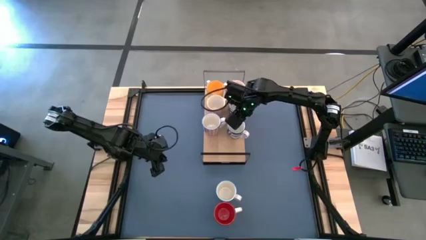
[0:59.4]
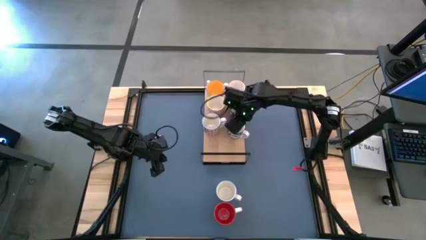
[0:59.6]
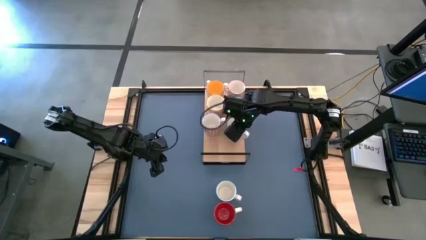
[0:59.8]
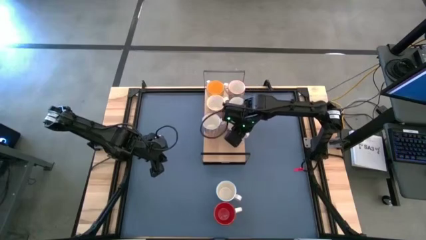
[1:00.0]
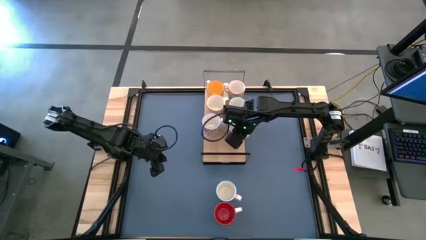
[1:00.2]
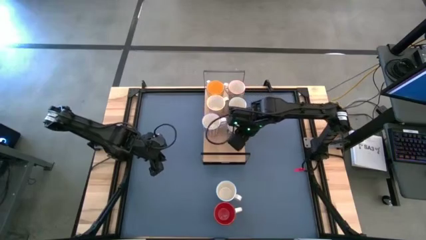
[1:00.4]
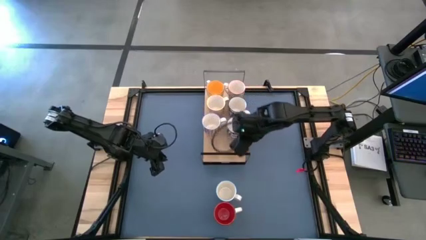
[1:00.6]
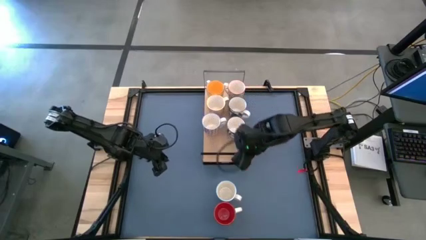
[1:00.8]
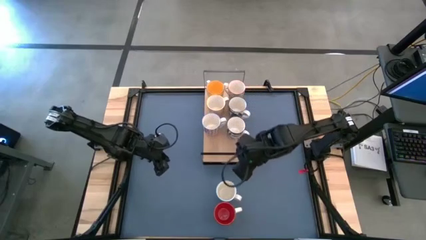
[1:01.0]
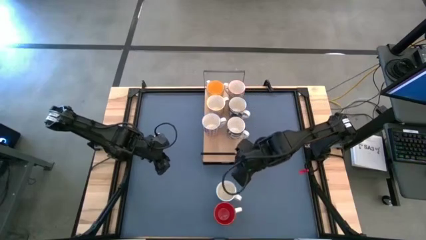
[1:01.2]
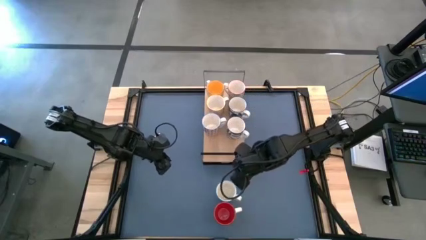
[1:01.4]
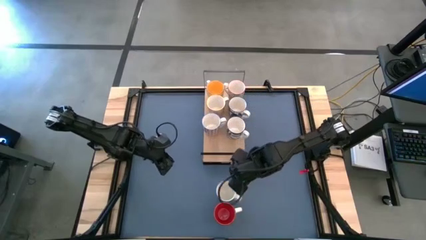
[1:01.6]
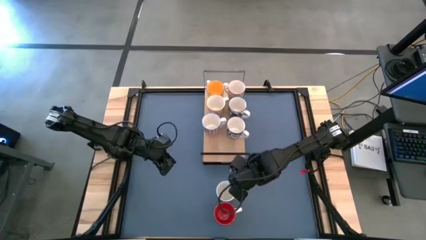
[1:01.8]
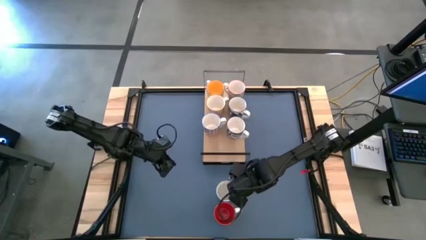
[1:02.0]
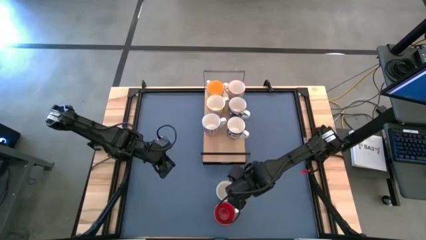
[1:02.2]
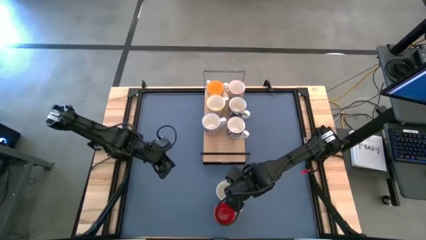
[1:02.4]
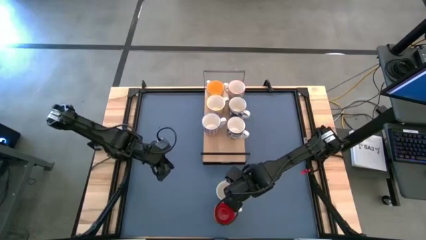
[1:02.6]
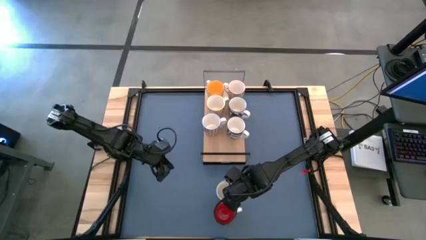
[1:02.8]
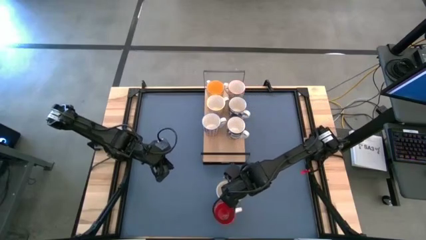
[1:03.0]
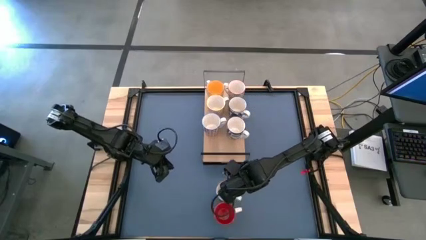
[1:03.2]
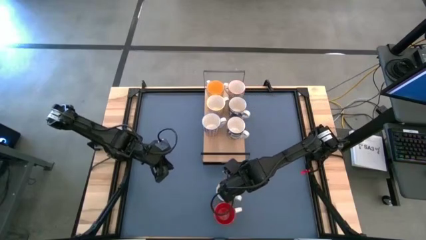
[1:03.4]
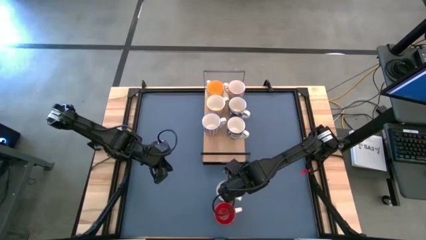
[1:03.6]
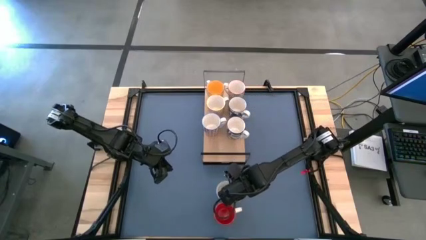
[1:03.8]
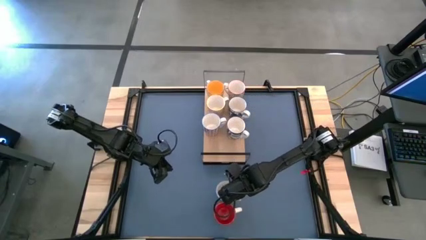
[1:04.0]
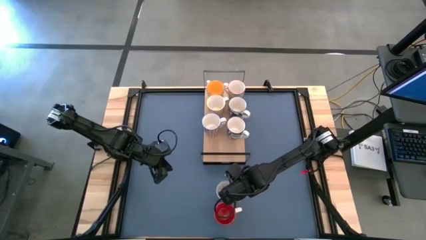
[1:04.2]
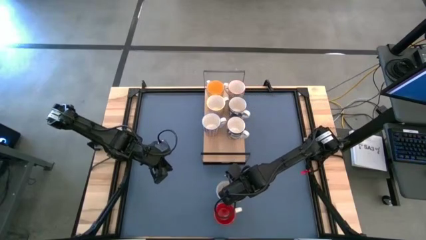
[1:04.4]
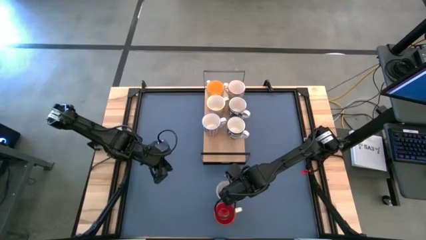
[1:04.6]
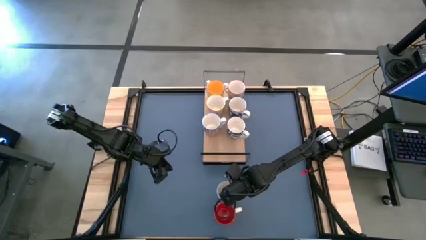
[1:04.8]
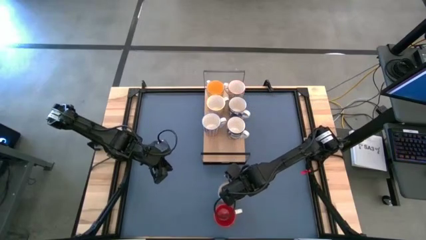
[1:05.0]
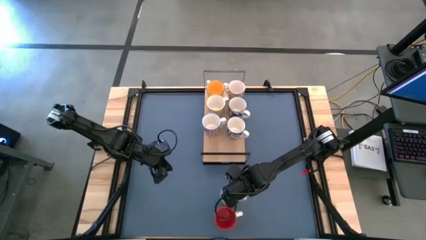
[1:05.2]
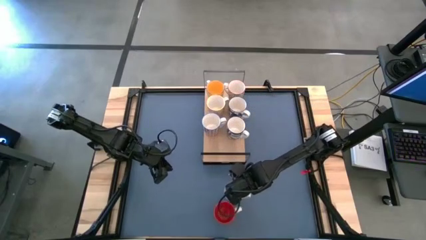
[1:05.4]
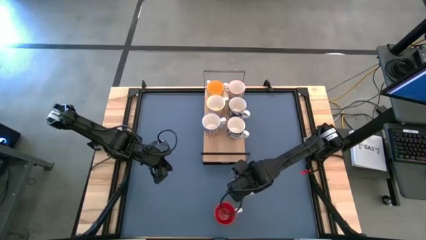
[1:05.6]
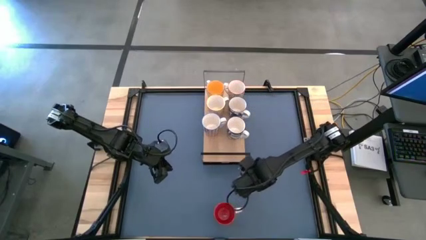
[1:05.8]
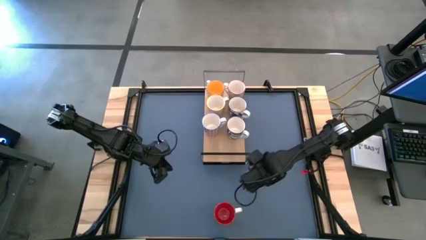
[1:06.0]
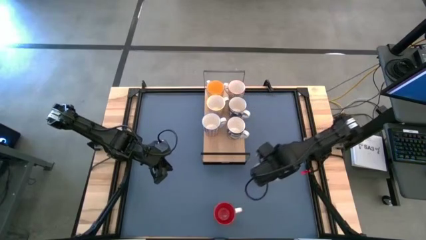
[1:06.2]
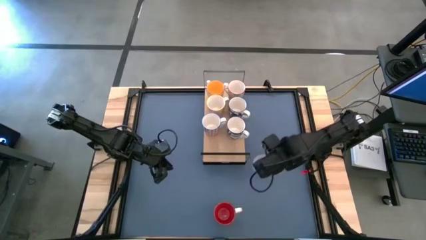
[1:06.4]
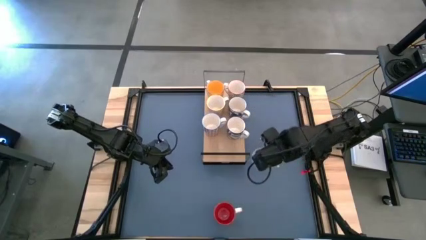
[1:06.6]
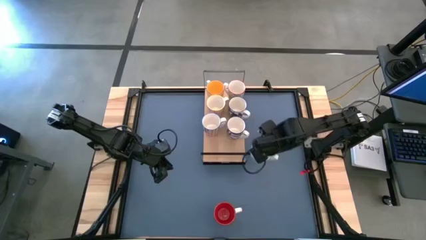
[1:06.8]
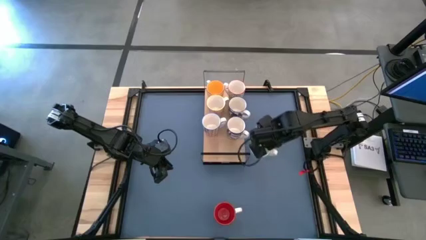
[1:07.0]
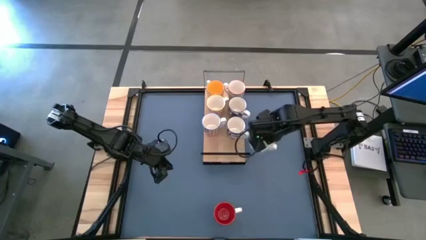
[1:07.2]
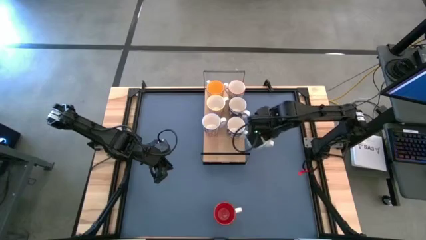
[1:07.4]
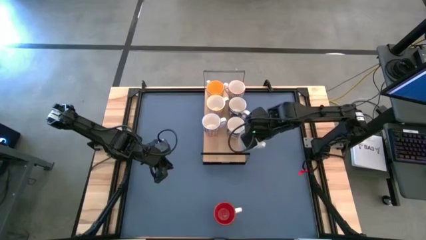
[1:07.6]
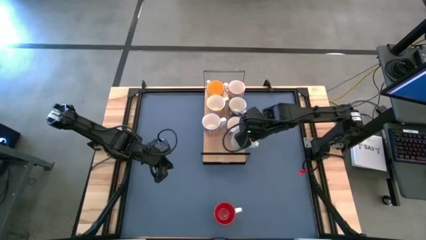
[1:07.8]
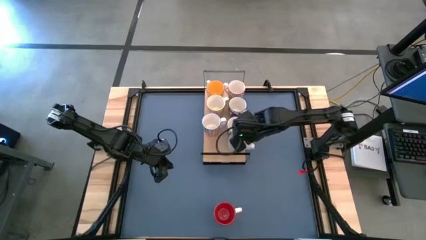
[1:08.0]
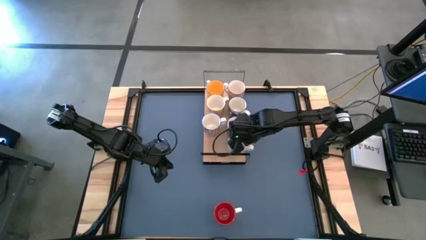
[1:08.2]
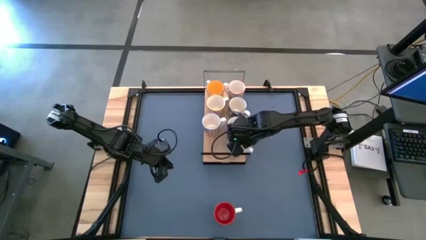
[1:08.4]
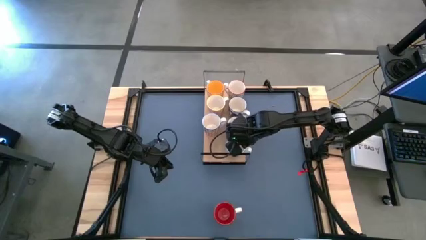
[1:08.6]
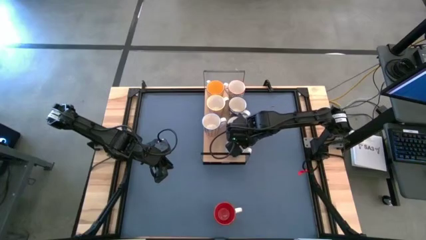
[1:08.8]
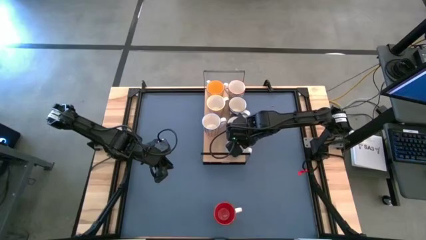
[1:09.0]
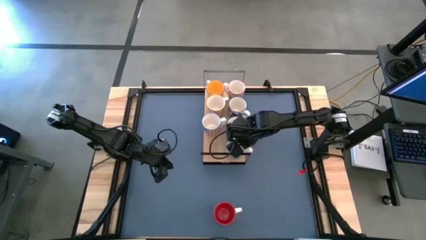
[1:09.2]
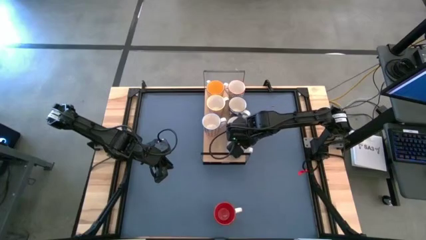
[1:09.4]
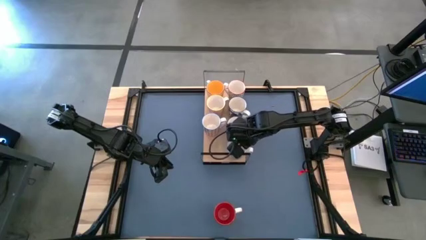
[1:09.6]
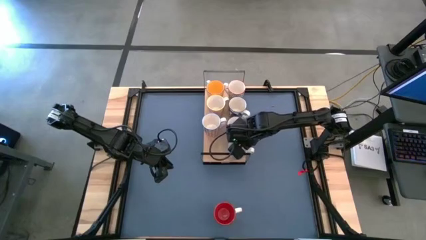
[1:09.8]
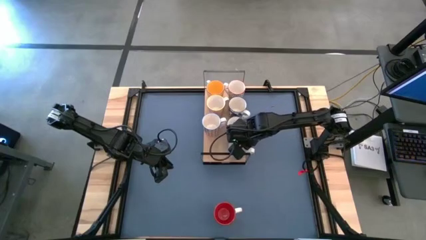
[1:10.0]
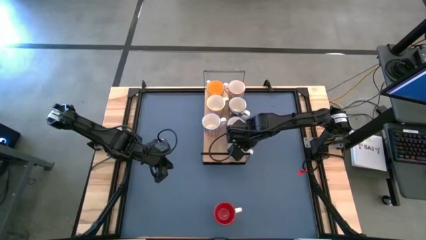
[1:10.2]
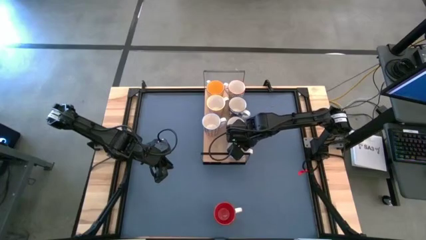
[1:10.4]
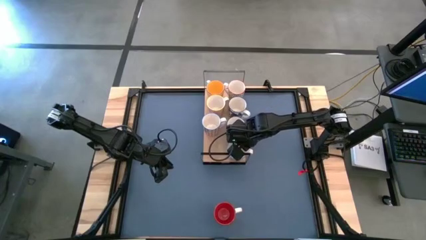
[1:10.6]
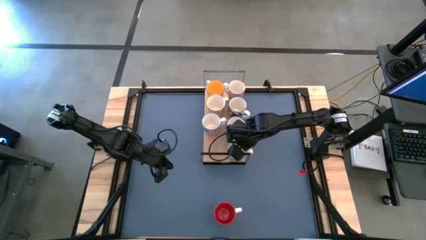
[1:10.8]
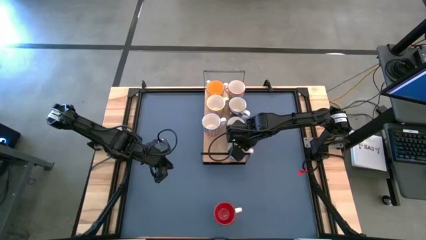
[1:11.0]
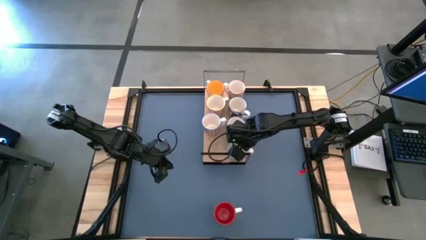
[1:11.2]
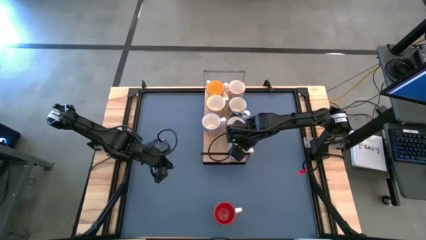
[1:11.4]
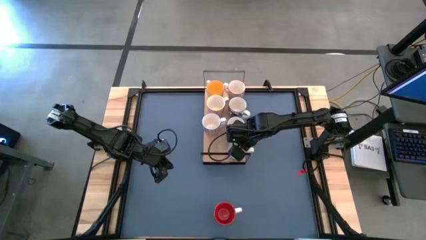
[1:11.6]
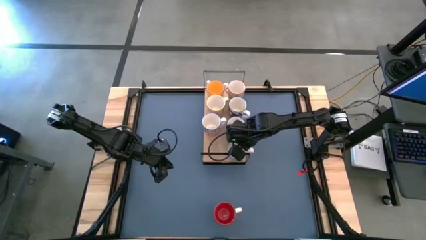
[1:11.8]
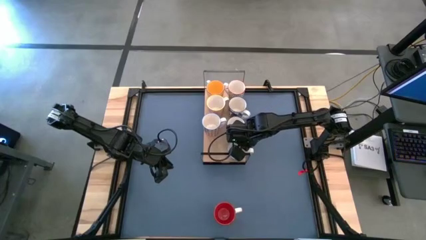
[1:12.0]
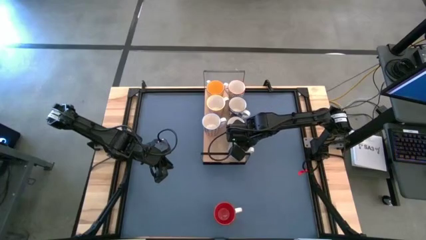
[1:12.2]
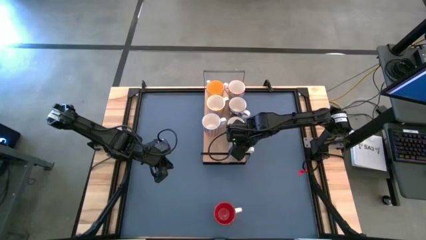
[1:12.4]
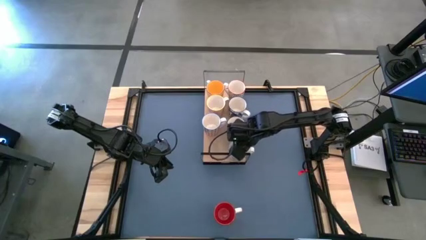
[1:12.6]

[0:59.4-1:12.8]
Task: Place coffee mugs
Put the green mug on the shelf
